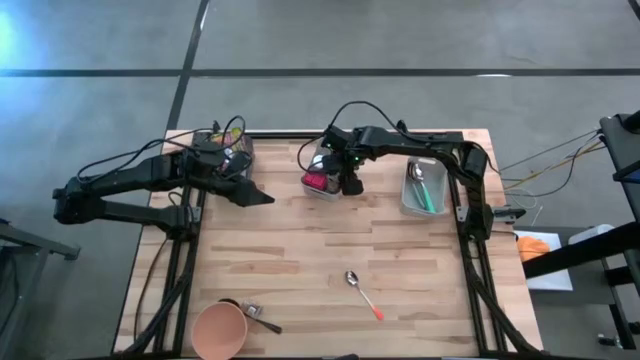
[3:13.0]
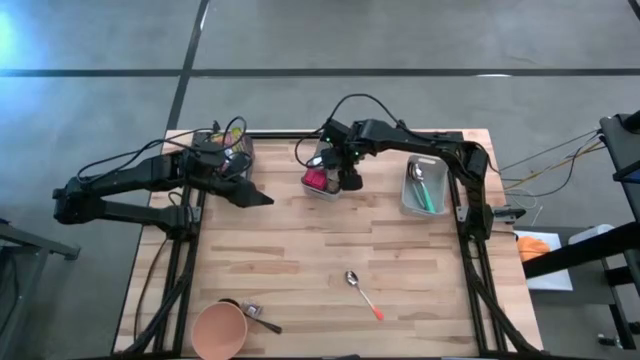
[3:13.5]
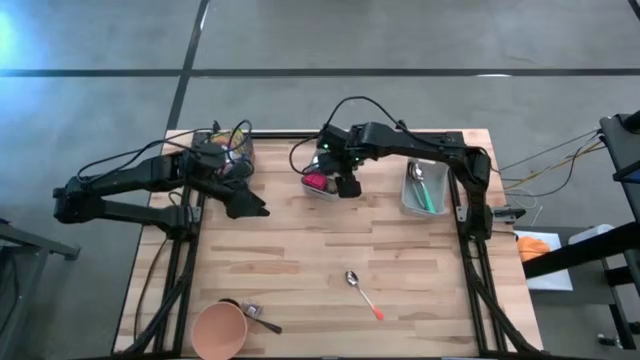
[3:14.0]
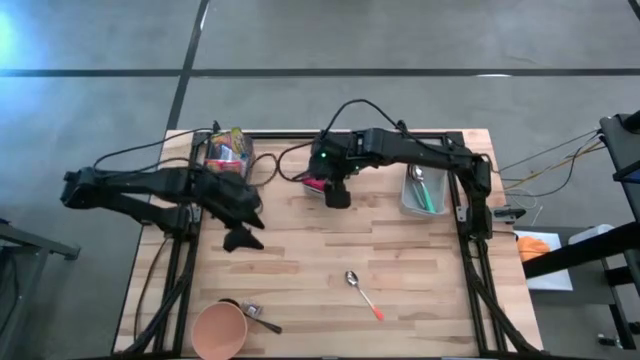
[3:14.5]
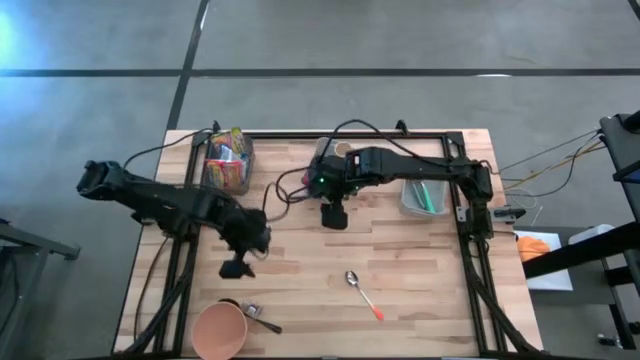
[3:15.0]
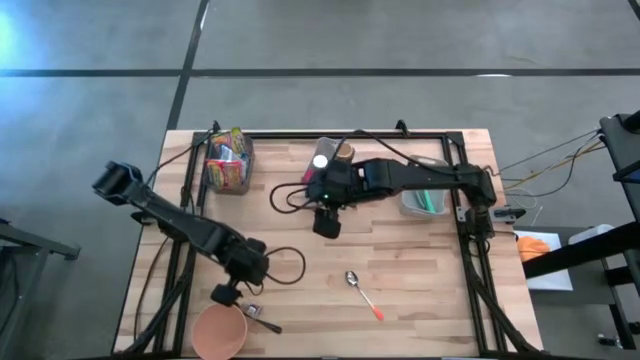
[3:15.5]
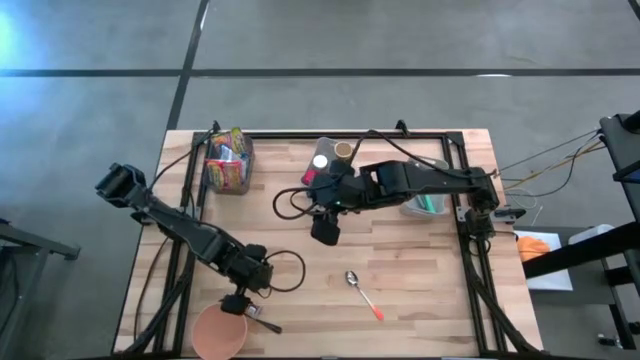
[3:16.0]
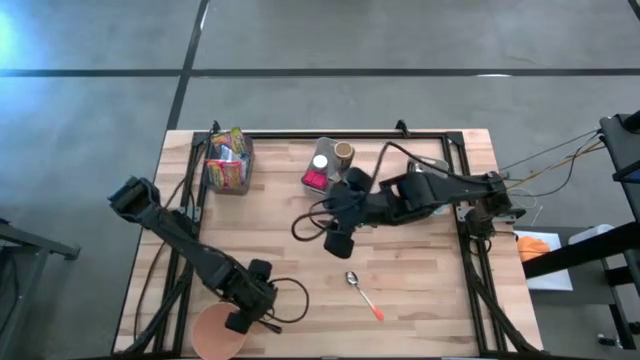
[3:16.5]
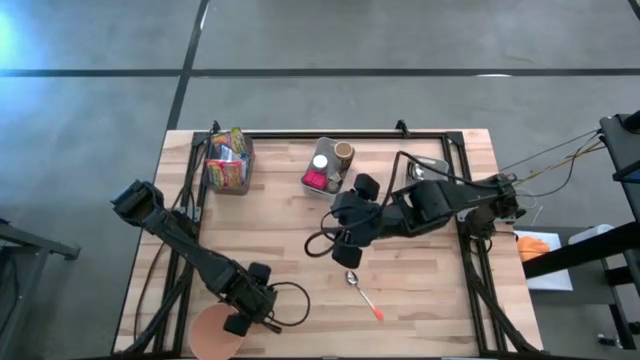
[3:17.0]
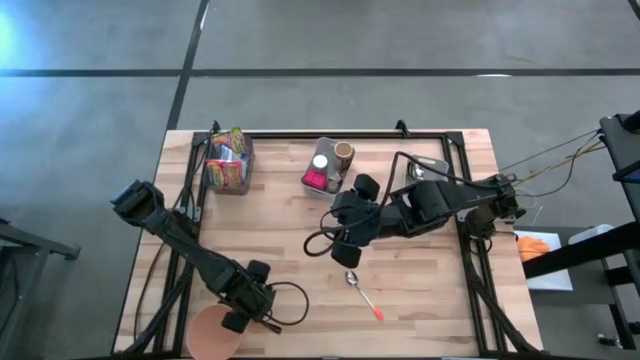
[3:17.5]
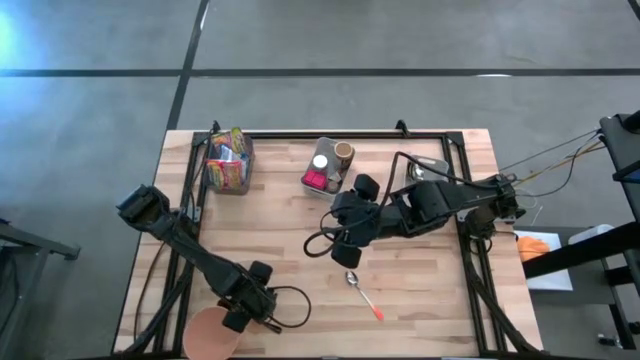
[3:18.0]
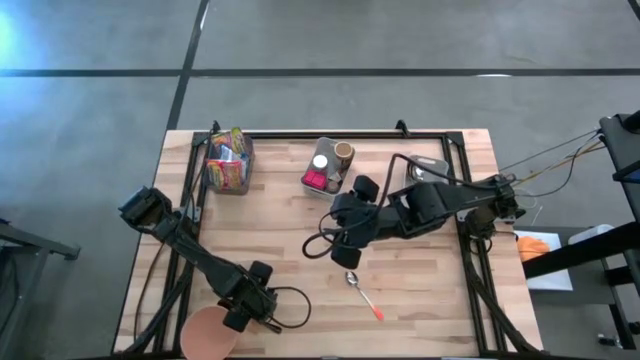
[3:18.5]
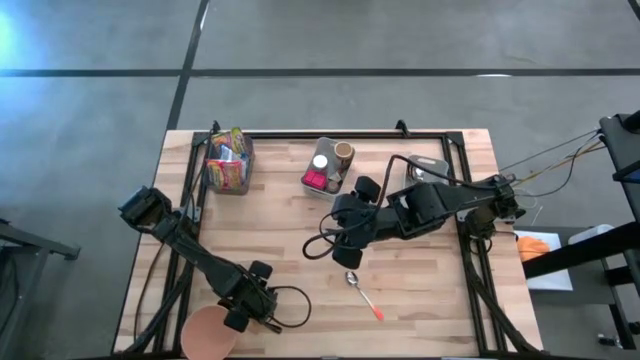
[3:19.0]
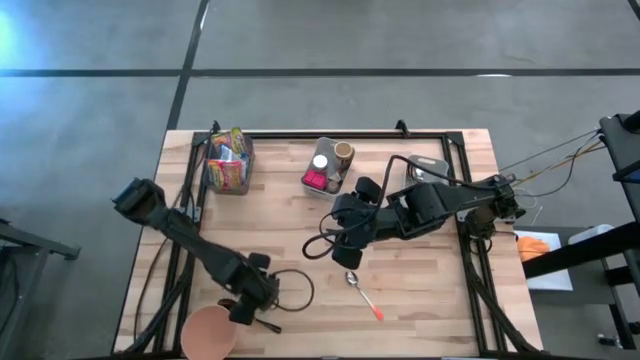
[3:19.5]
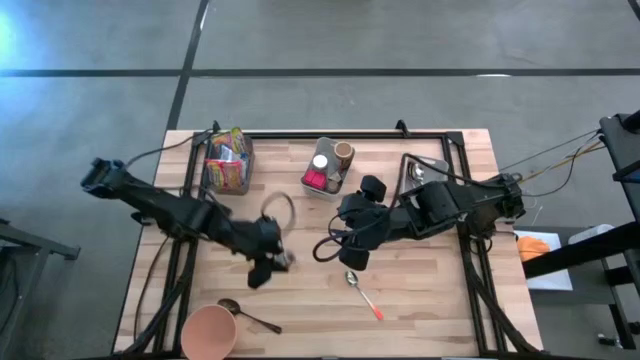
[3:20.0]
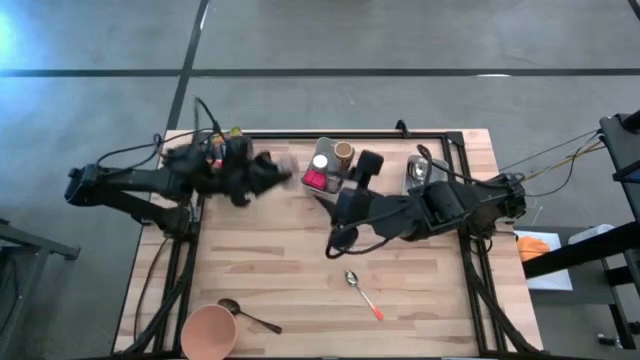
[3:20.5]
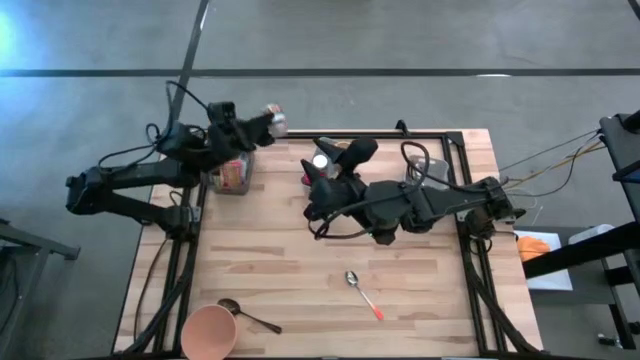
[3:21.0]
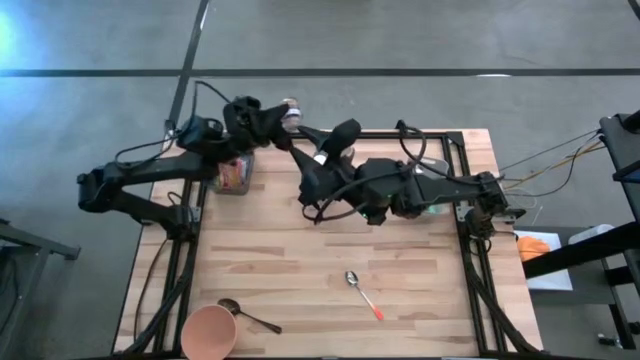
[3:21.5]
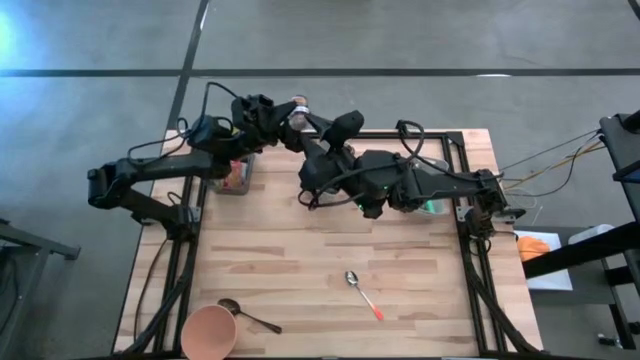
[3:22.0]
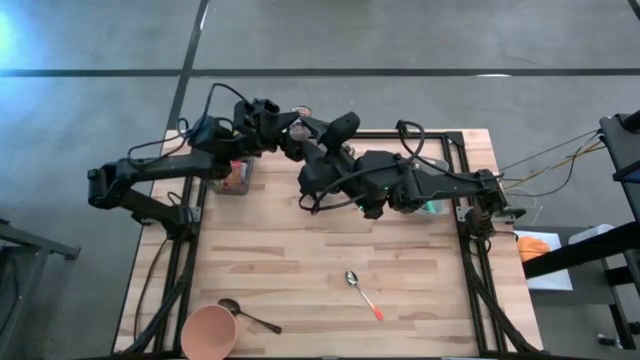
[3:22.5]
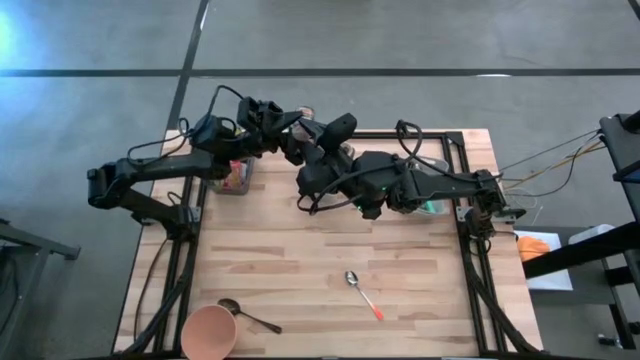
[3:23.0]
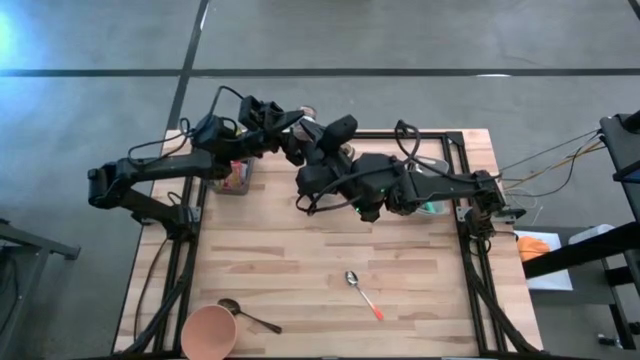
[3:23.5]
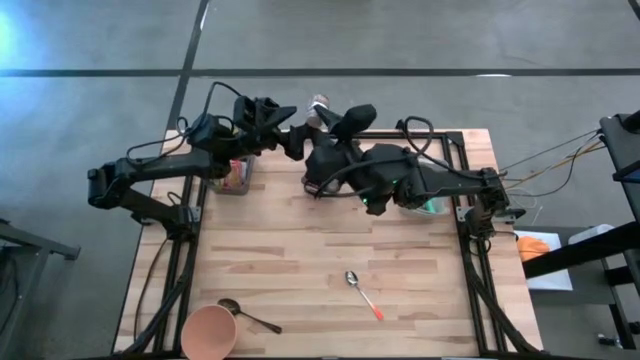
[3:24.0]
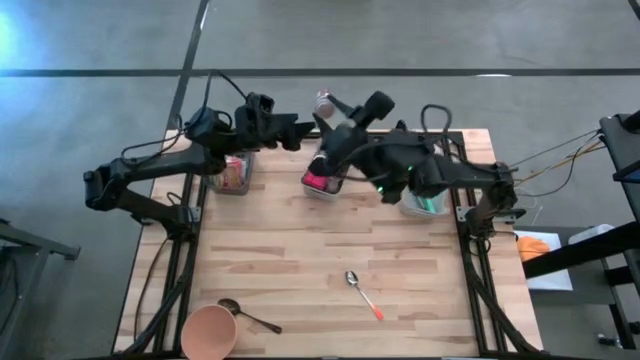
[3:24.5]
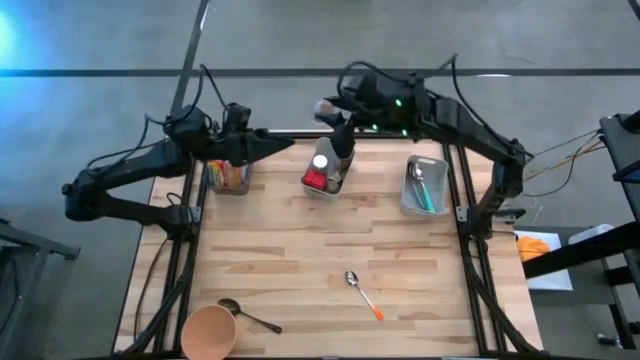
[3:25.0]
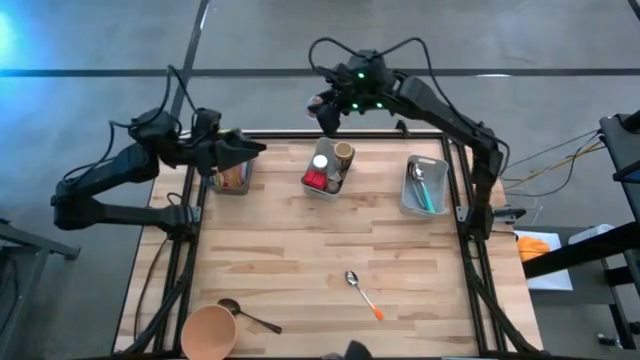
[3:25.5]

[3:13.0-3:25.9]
Put the brown seasoning bottle into the left gray bin

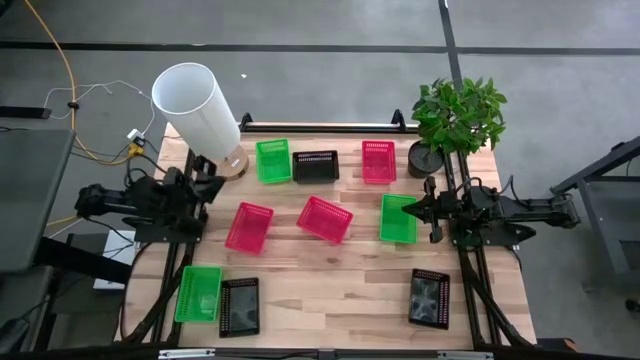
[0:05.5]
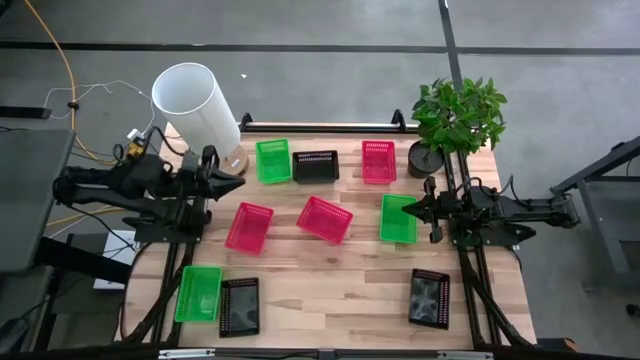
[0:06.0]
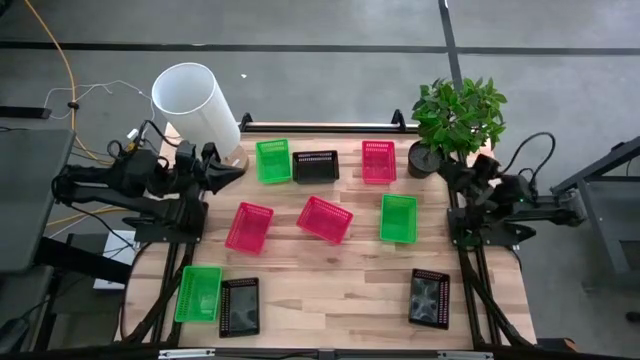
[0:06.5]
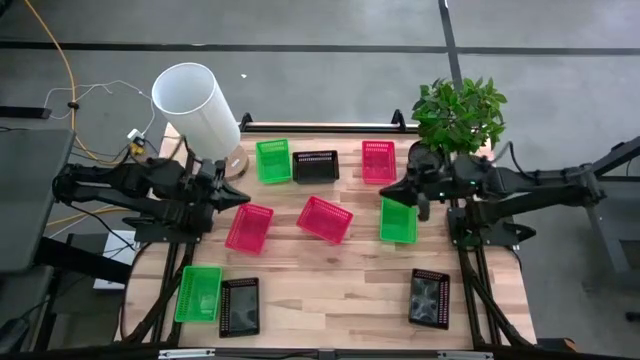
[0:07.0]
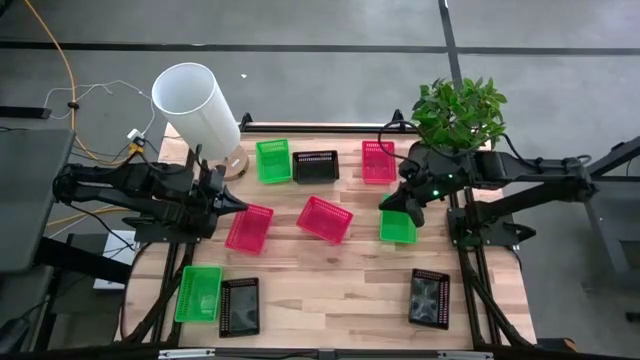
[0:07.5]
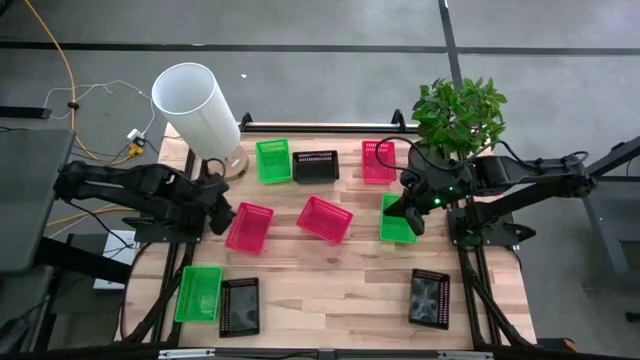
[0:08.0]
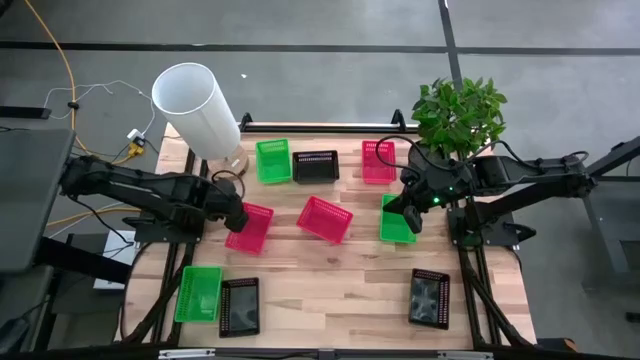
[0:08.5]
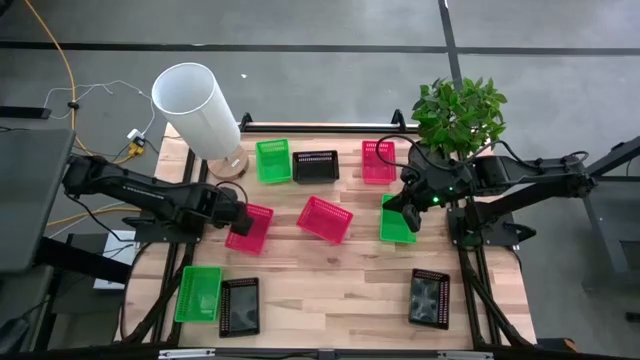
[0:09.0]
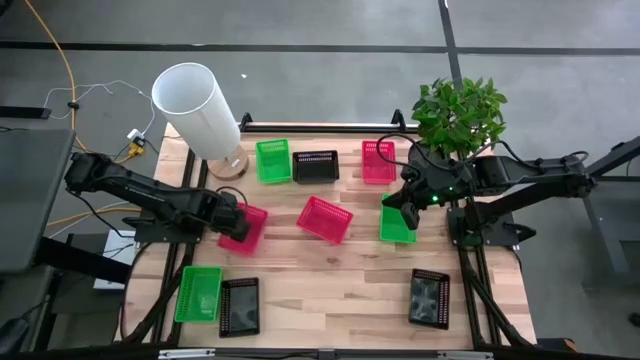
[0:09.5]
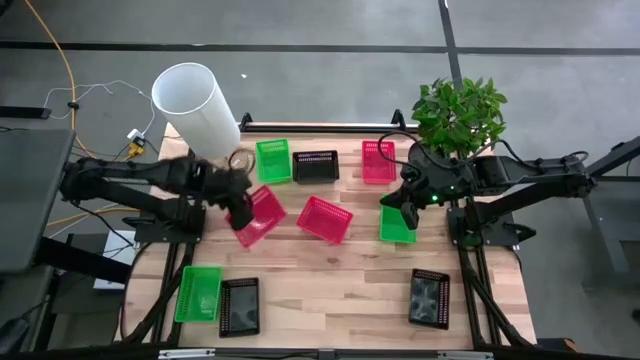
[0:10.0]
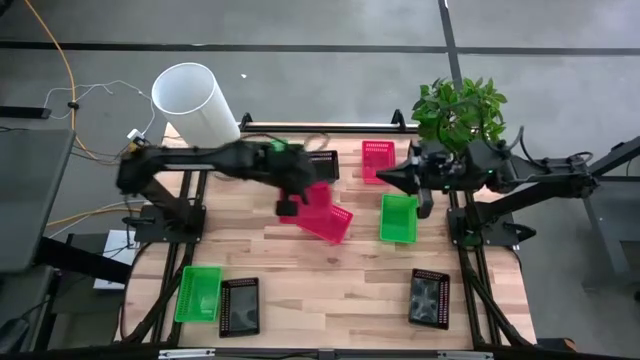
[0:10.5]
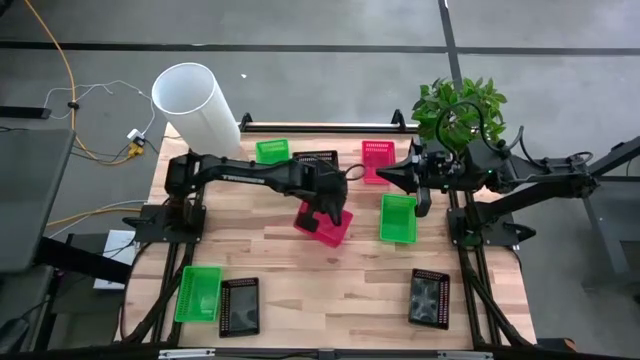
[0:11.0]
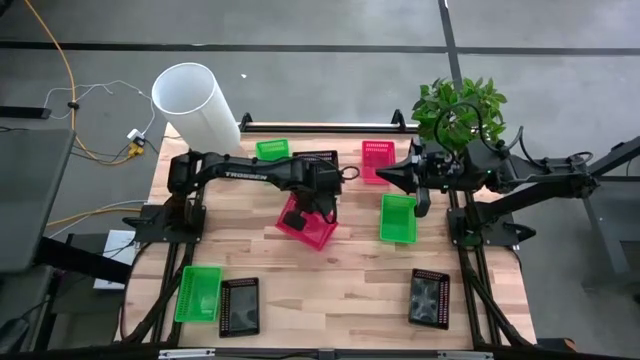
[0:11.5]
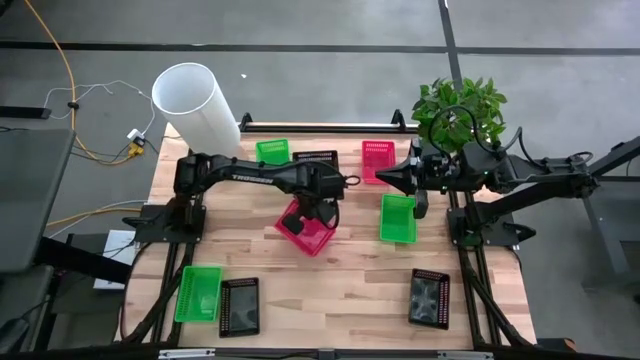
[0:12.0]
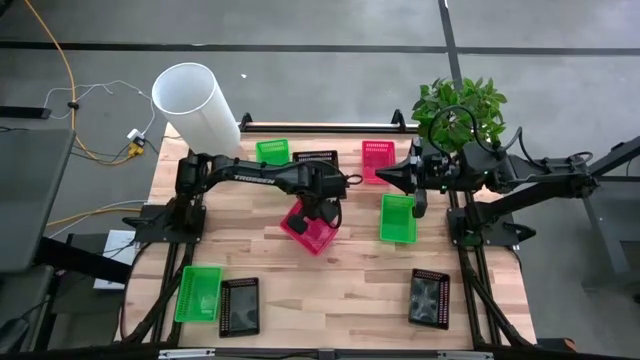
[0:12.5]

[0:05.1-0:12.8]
Stack the bottom left red bin on the middle red bin
